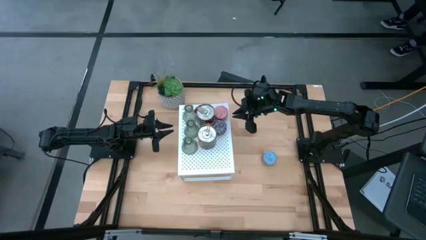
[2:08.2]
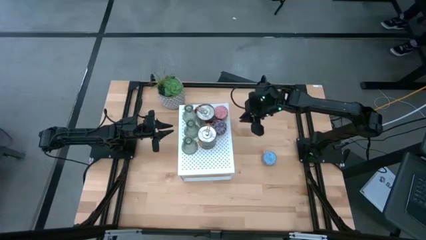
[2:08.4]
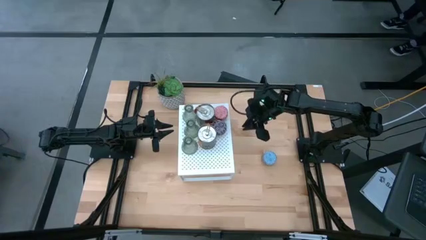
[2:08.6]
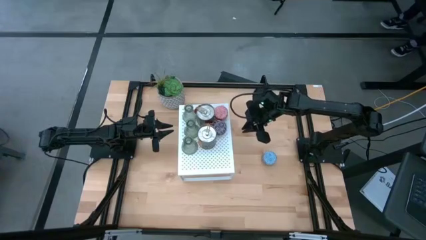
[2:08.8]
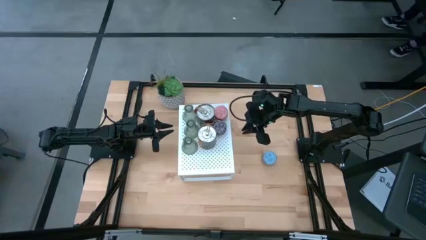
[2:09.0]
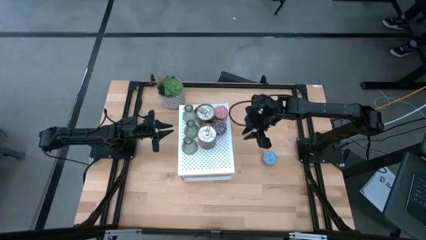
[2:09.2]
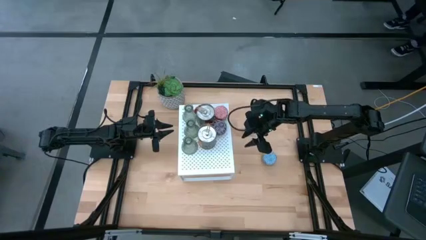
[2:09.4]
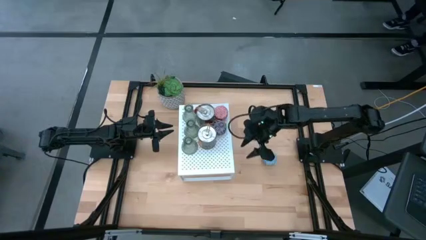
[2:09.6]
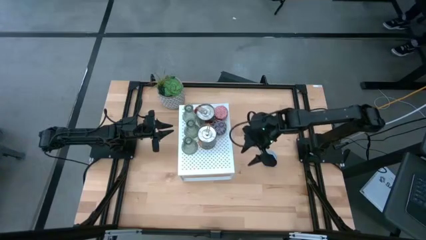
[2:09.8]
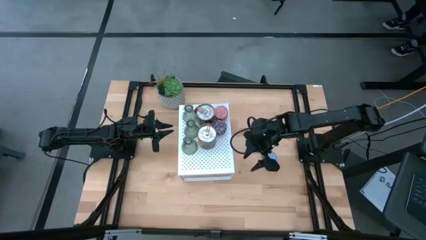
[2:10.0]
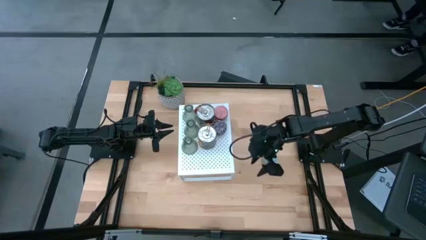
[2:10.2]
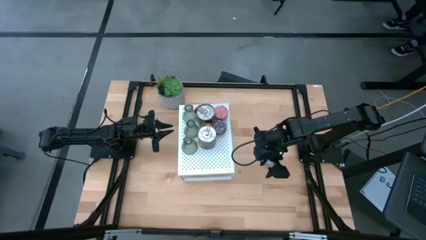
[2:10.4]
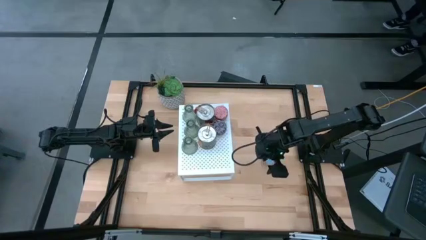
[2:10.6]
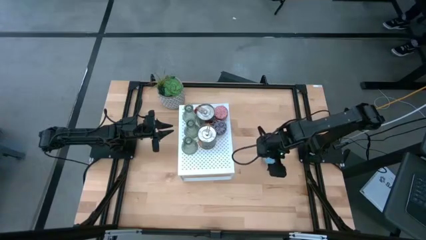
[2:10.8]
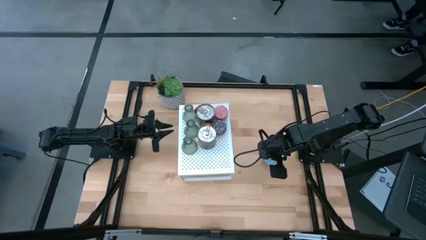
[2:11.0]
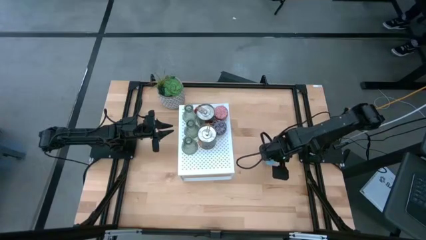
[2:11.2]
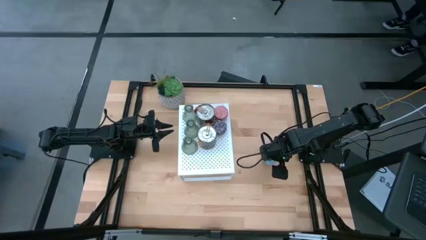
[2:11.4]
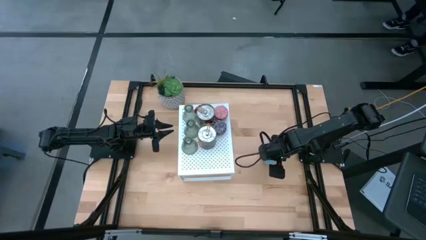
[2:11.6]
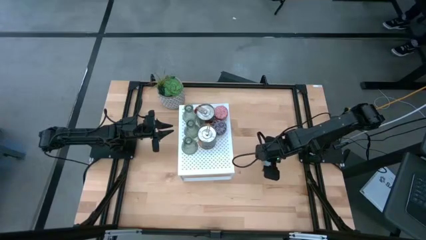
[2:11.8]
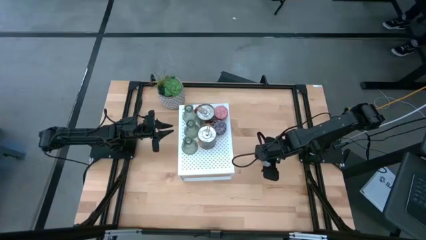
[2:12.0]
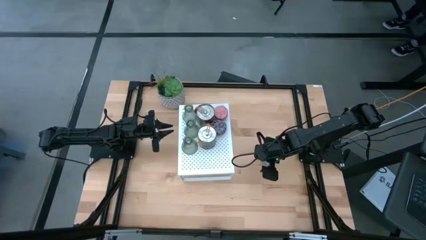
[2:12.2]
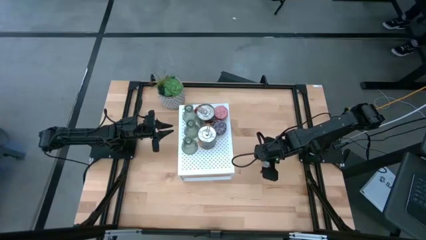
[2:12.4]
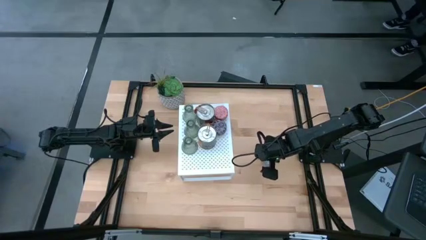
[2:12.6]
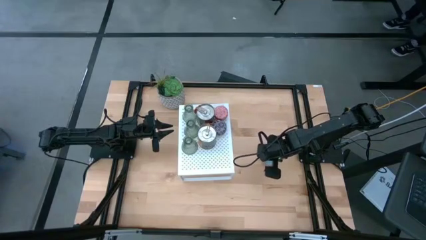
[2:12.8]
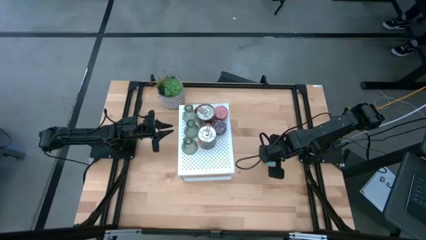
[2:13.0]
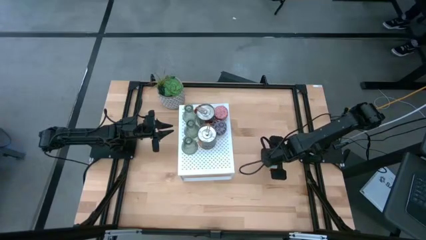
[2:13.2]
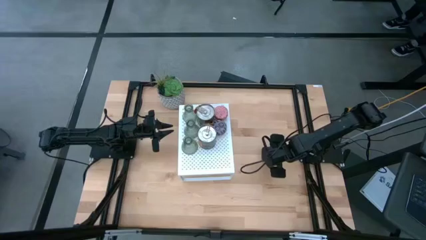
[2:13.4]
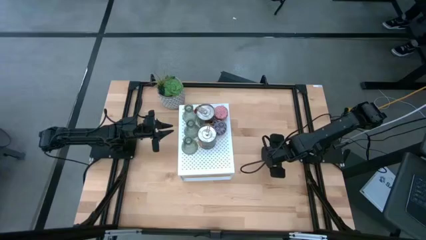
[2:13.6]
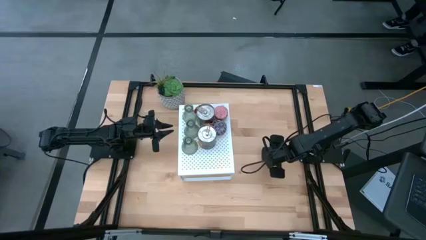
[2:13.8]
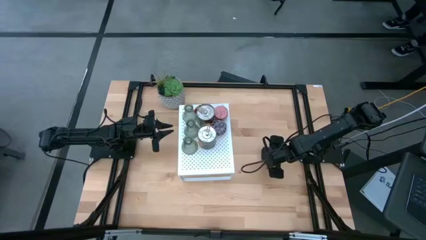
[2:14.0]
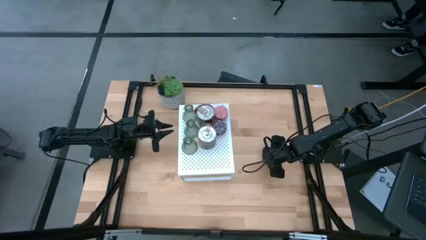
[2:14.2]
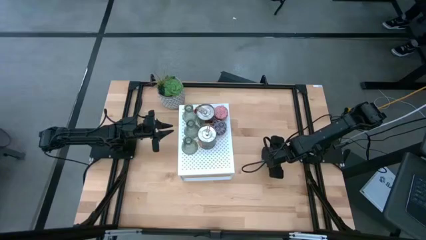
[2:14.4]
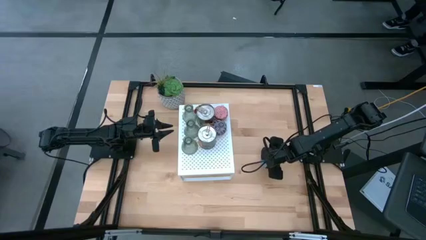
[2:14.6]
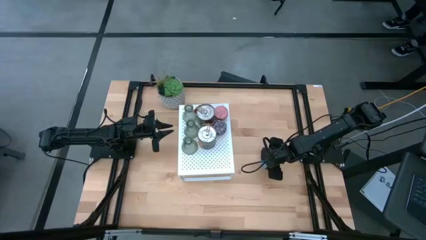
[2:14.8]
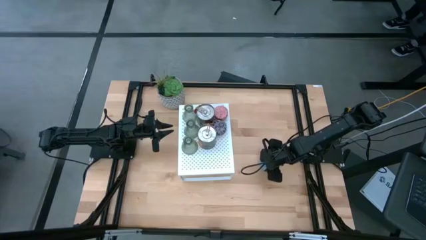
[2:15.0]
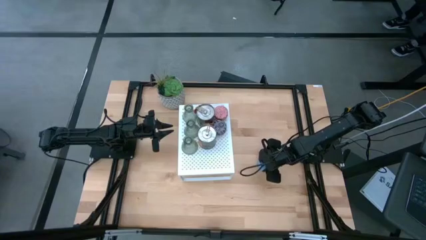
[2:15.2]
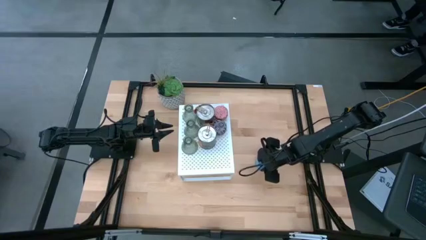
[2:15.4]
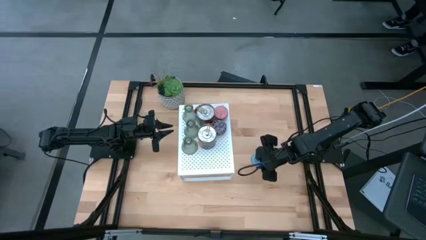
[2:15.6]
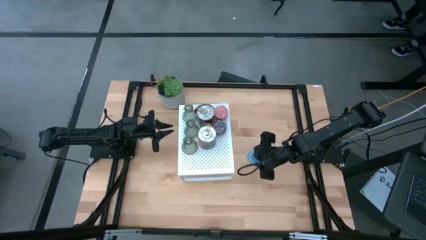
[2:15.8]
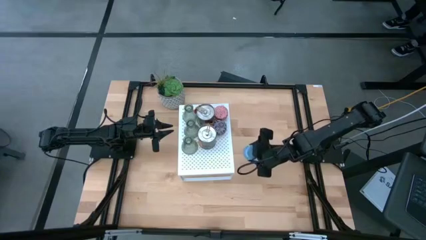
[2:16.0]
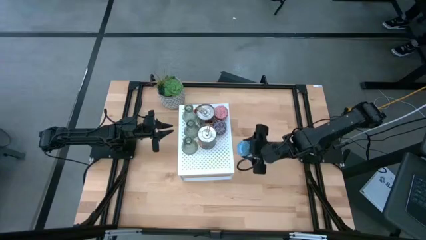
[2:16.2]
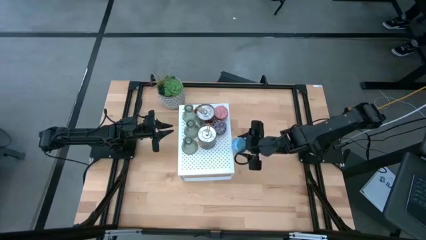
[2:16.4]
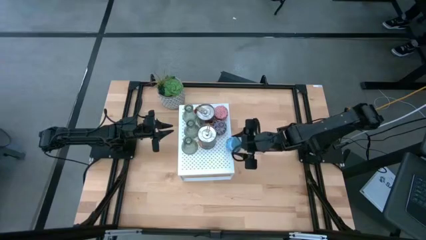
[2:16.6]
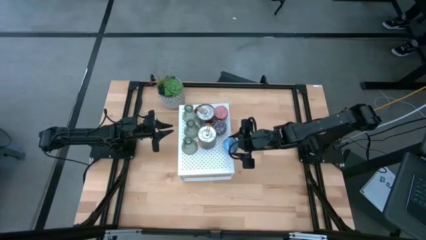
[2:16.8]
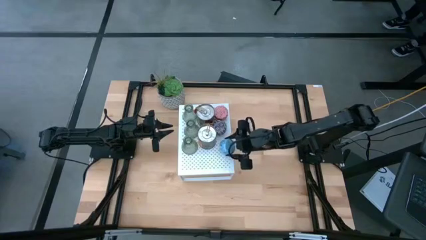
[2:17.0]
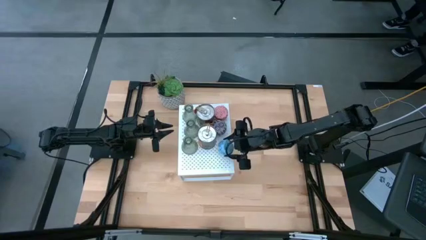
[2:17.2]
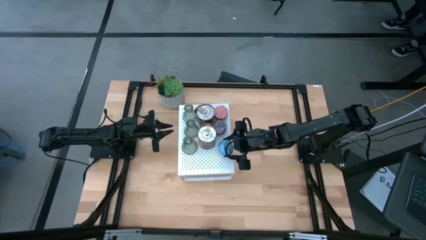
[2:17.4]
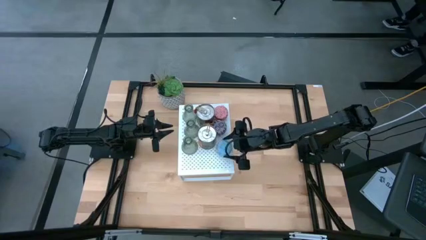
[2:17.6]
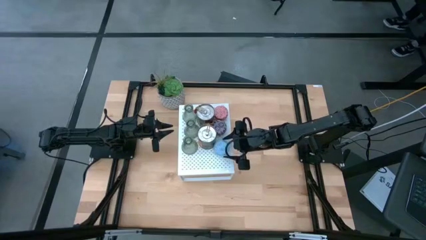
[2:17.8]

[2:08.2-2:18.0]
Task: Pick & Place candle stick holders
Align the blue patterned scented candle with the other black patterned scented candle on the shelf

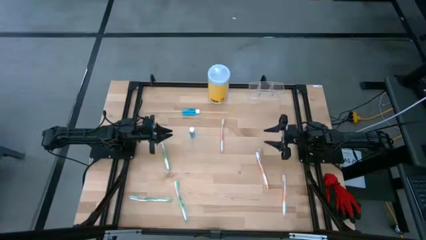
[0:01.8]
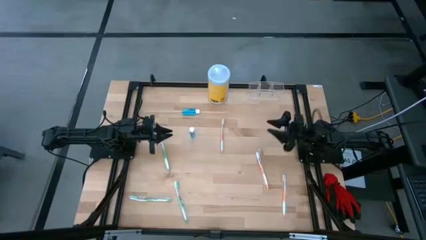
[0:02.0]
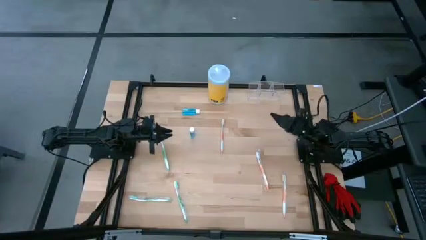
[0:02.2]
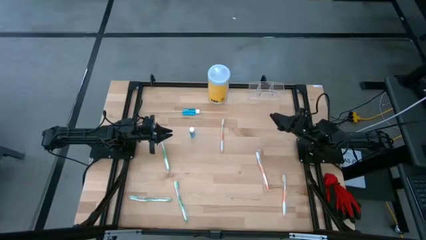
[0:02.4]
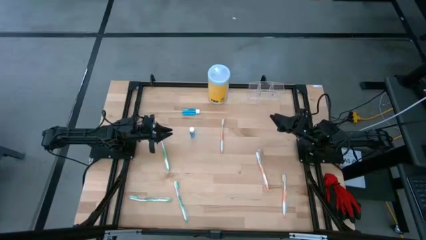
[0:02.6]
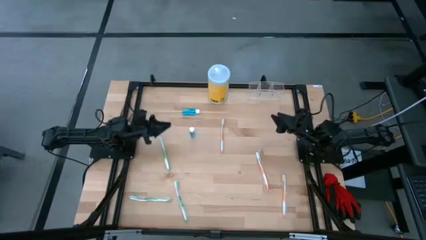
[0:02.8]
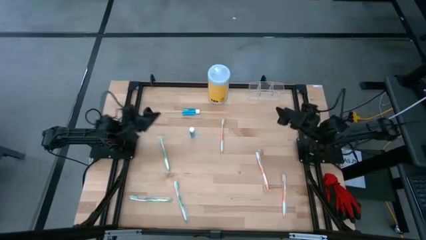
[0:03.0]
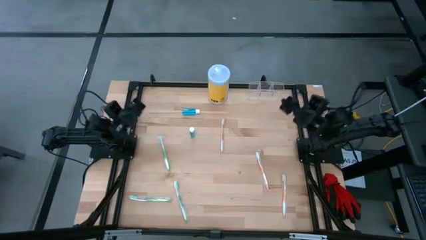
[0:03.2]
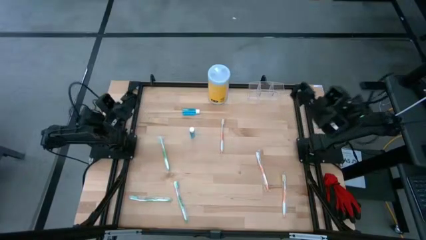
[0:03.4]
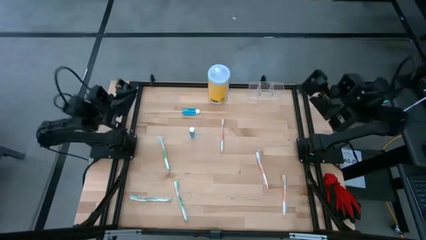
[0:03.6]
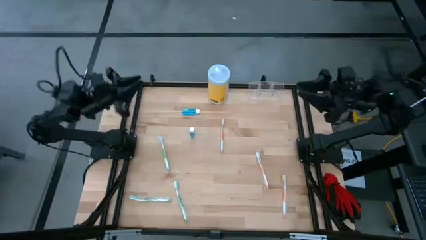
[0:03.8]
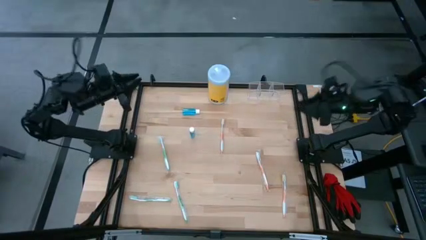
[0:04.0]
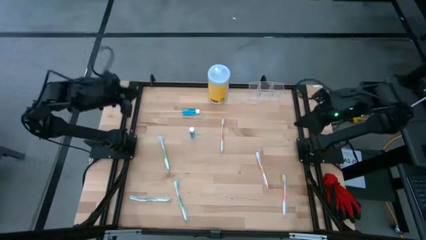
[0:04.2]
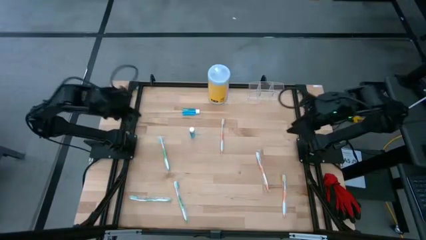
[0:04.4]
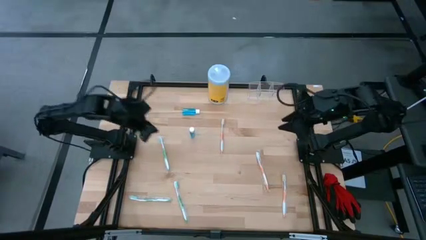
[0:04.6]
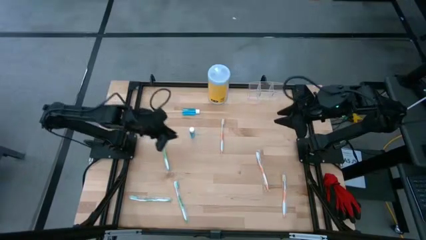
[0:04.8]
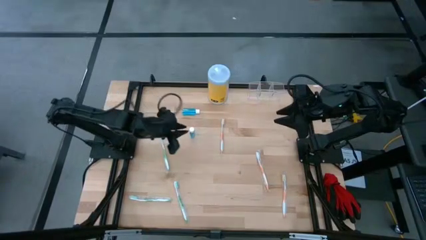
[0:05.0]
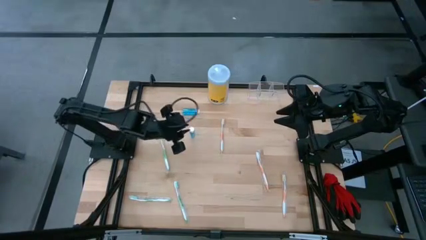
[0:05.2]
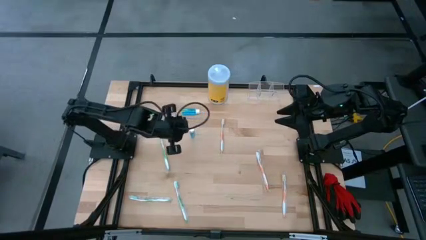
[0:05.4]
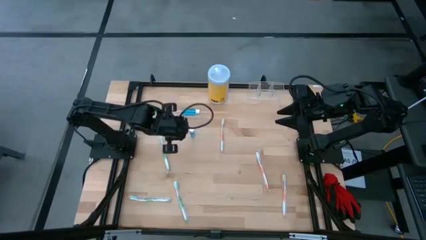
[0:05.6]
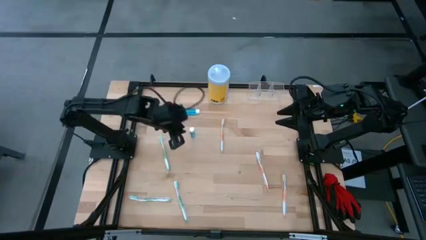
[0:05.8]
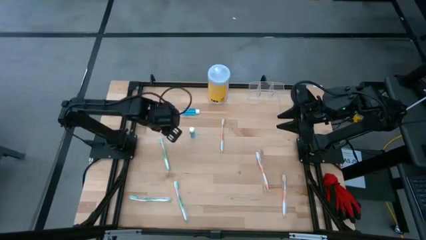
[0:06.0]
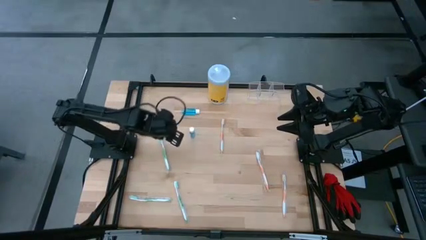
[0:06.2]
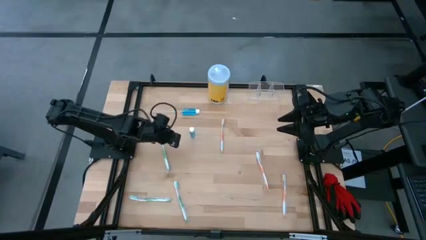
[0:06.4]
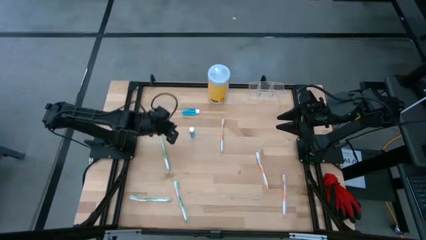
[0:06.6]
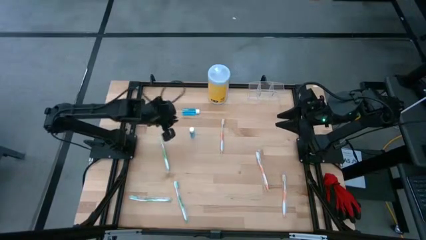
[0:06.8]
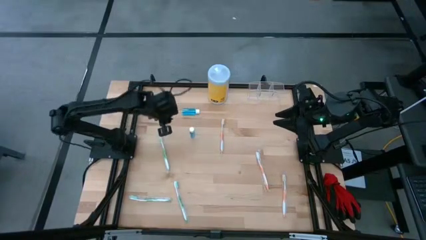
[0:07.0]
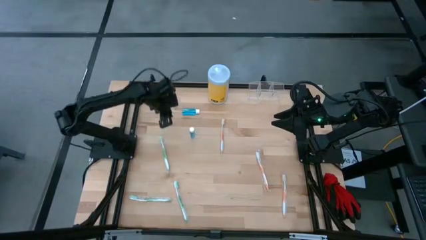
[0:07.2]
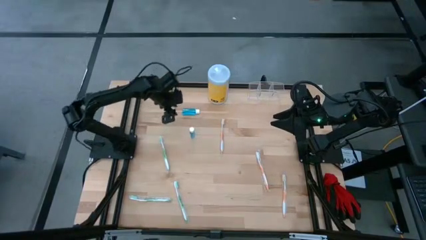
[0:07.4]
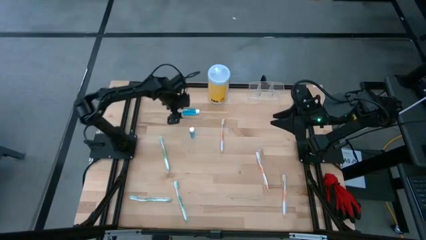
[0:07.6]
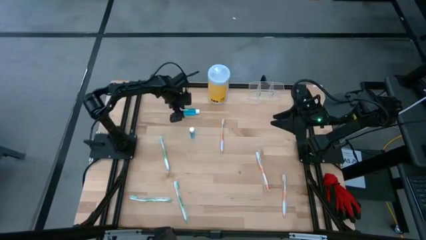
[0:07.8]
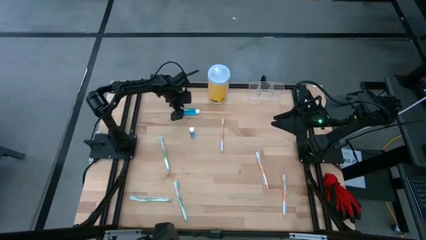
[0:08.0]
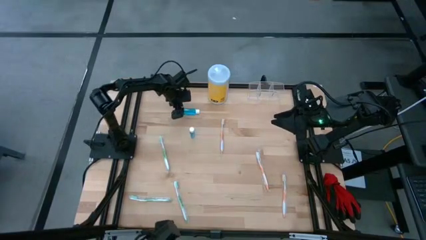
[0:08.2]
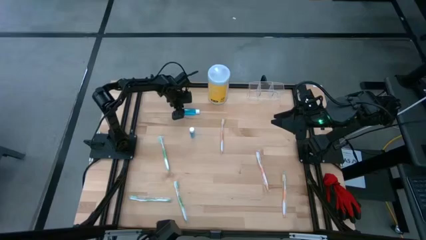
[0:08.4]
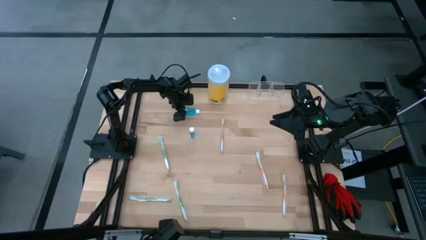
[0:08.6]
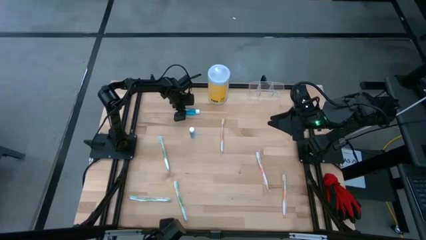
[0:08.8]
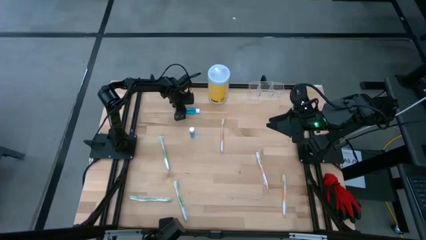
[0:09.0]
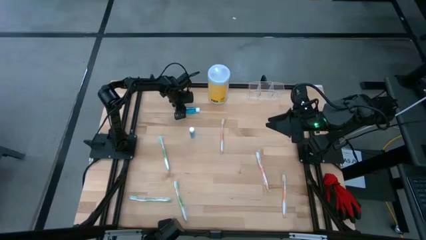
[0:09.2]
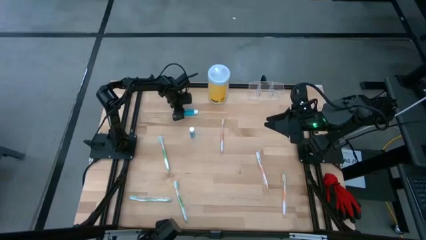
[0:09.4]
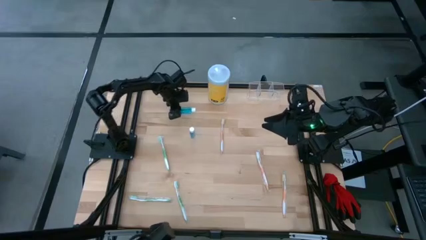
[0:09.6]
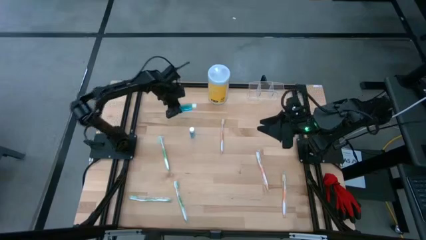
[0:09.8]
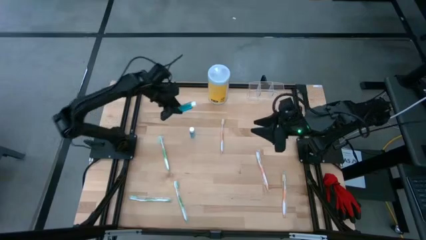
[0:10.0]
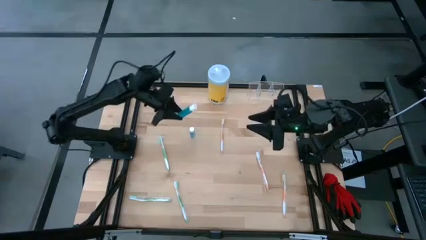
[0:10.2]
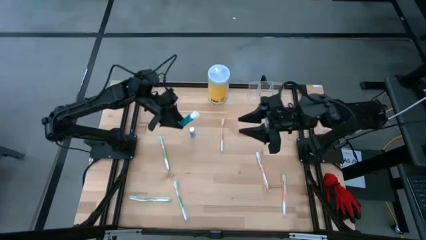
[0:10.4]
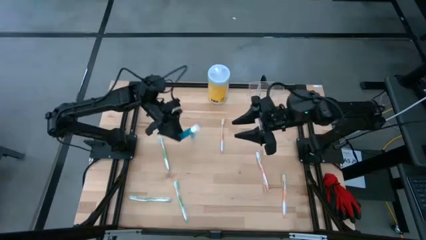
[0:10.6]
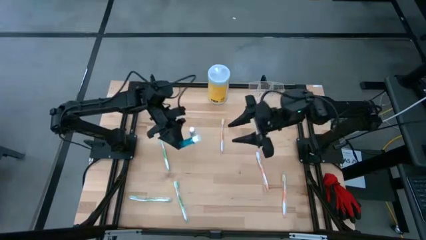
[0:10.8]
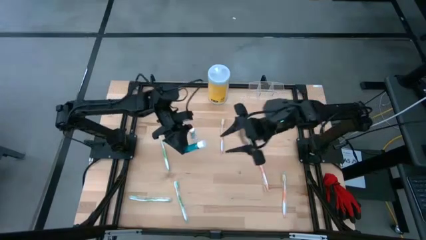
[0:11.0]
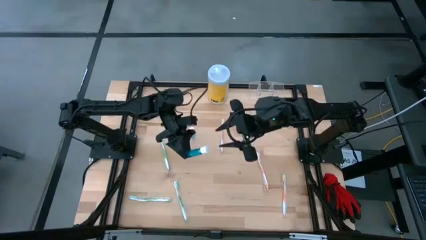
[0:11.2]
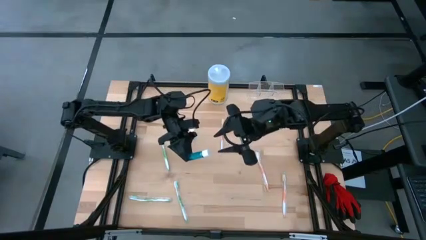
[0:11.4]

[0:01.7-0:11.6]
Task: Pick & Place toothbrushing station
Put the top blue mouthwash into the transparent organizer
